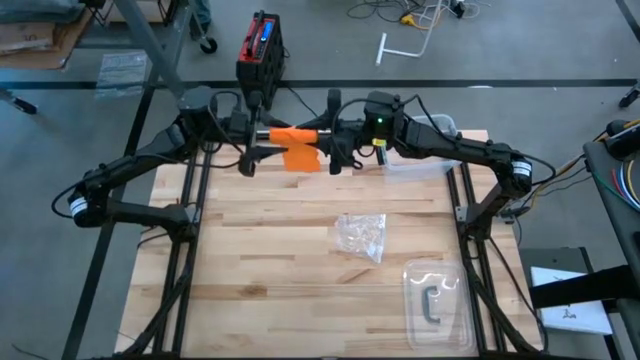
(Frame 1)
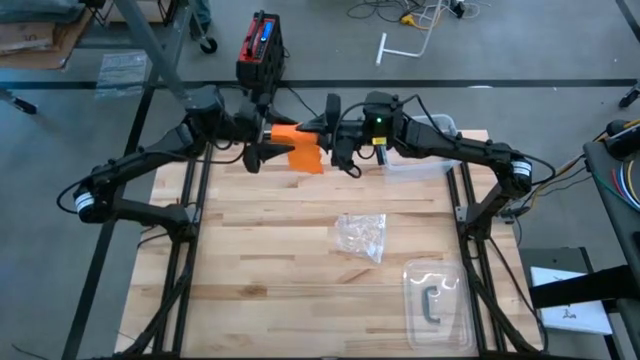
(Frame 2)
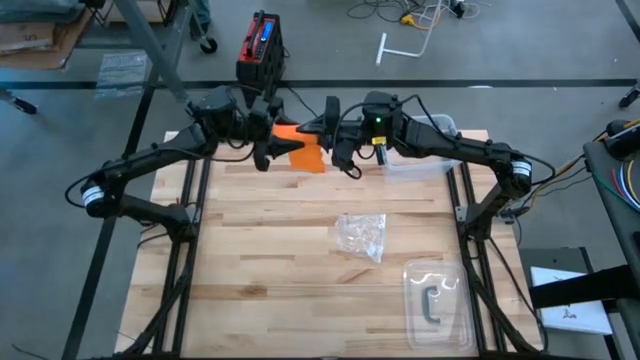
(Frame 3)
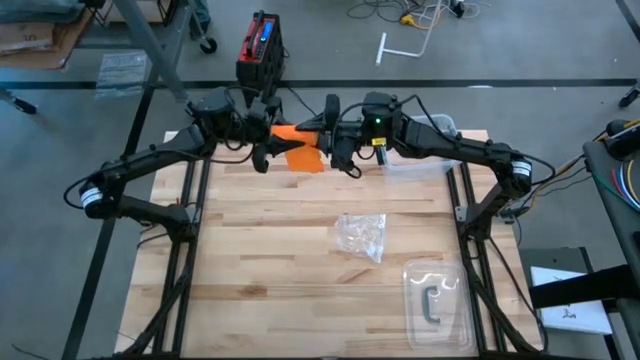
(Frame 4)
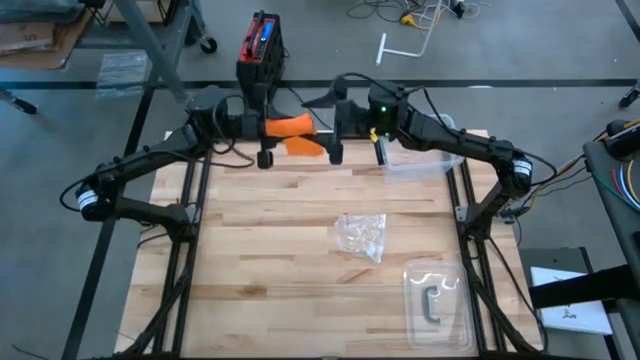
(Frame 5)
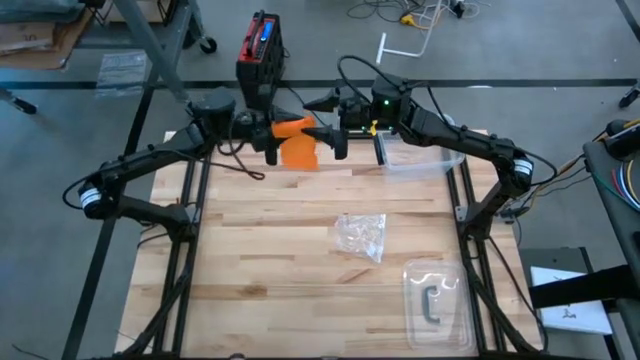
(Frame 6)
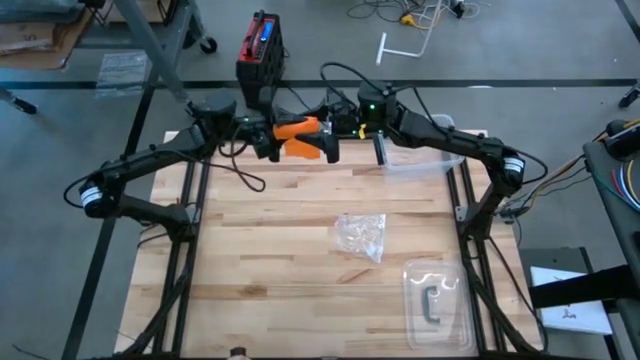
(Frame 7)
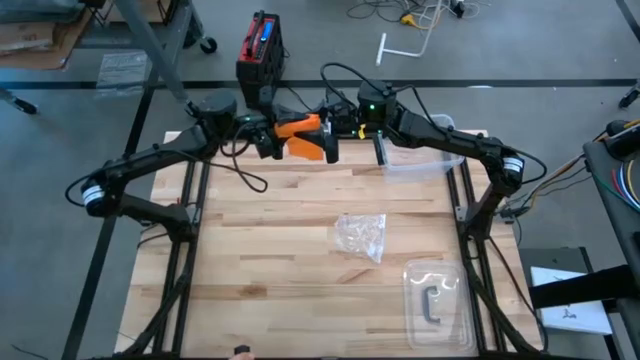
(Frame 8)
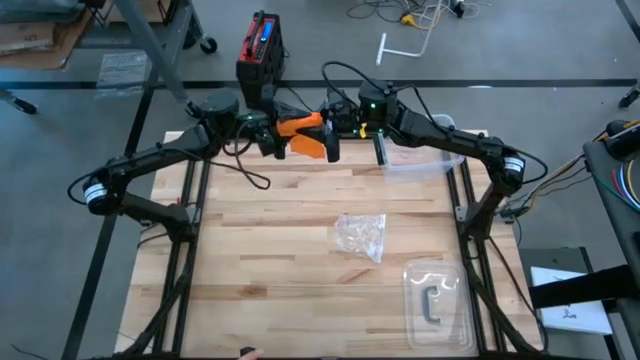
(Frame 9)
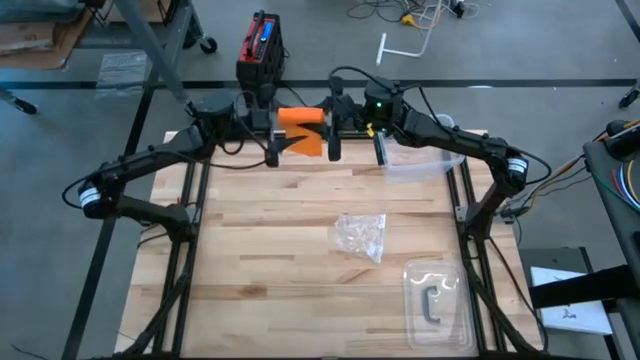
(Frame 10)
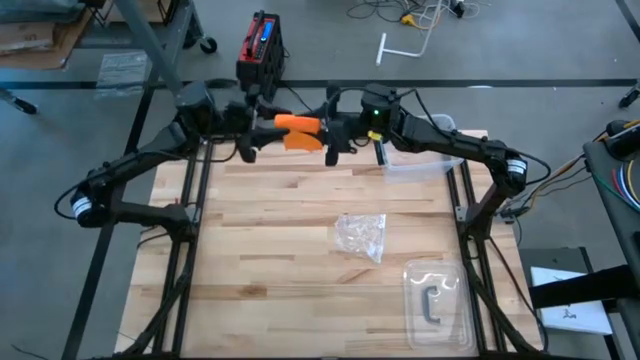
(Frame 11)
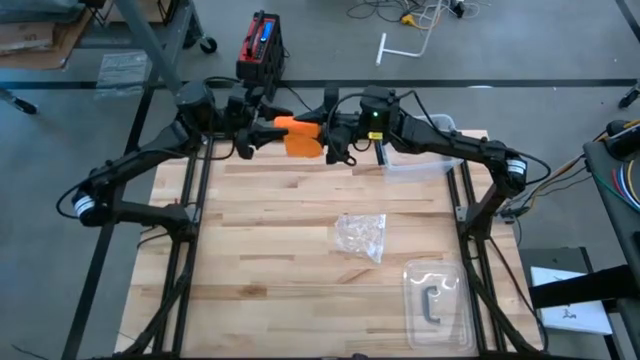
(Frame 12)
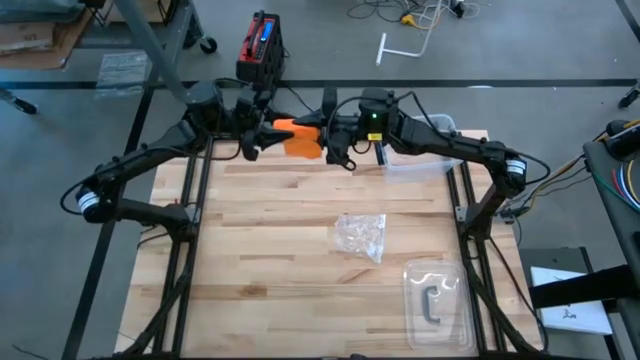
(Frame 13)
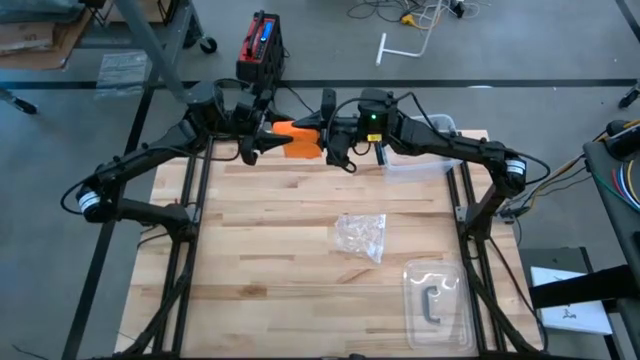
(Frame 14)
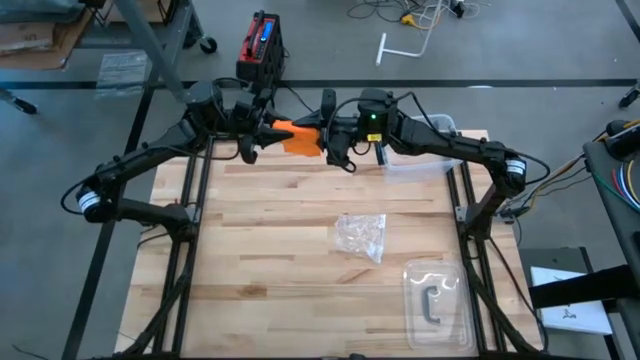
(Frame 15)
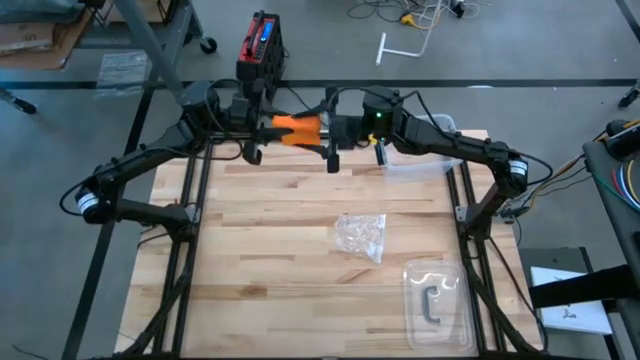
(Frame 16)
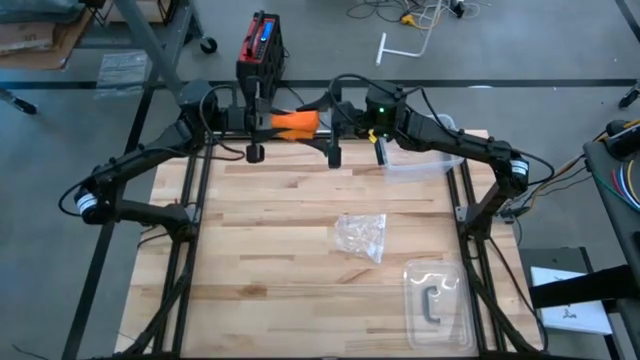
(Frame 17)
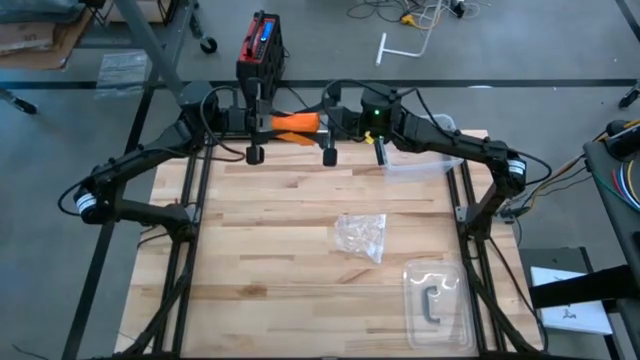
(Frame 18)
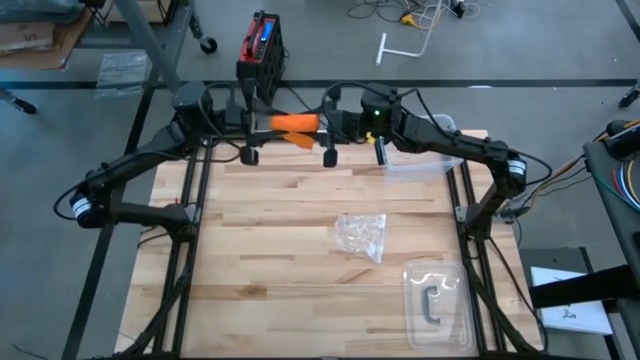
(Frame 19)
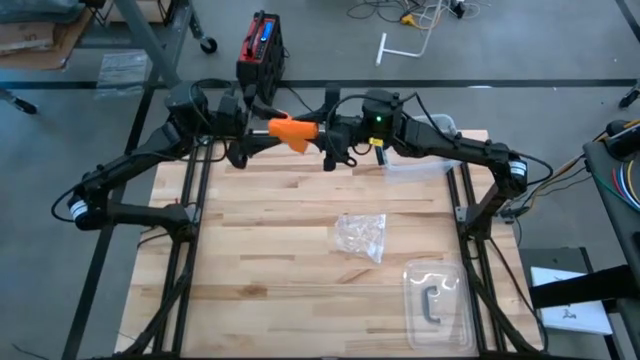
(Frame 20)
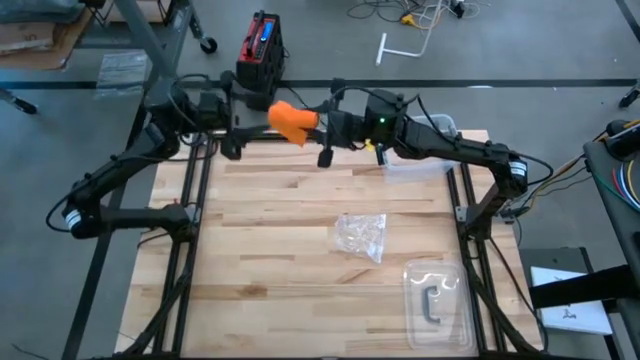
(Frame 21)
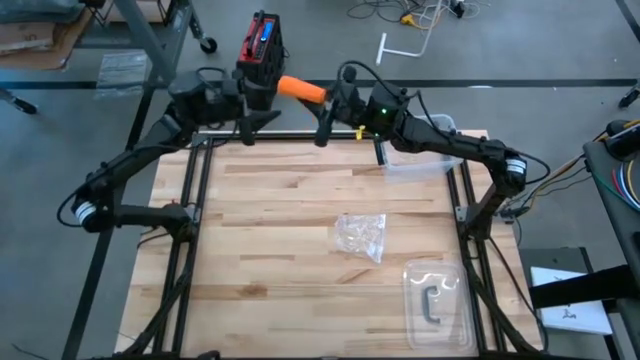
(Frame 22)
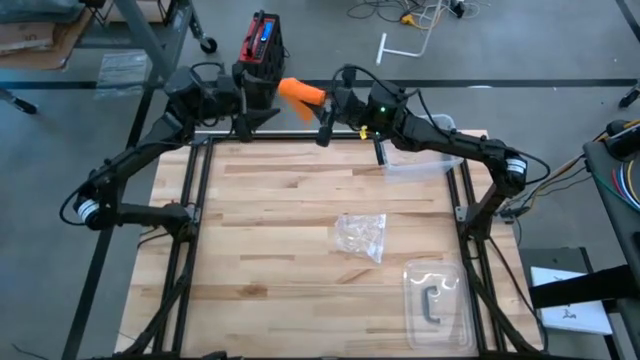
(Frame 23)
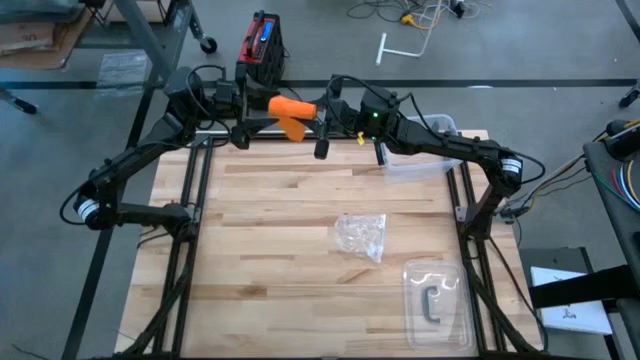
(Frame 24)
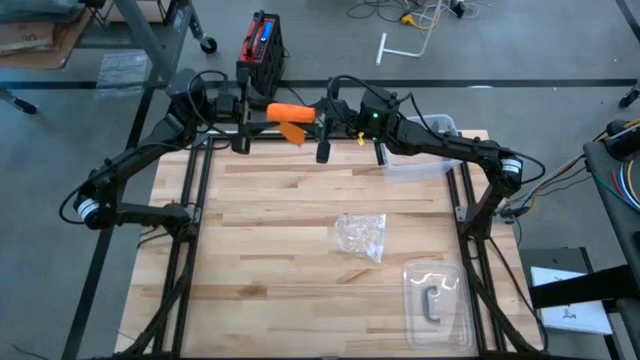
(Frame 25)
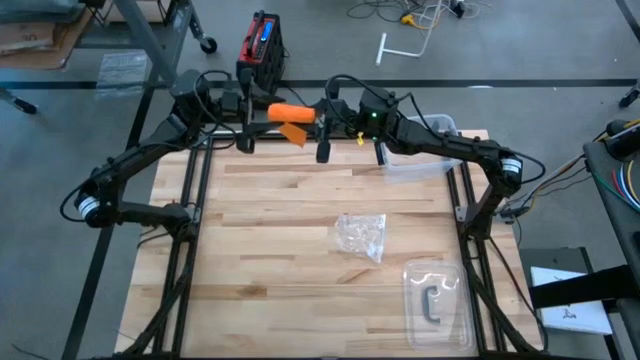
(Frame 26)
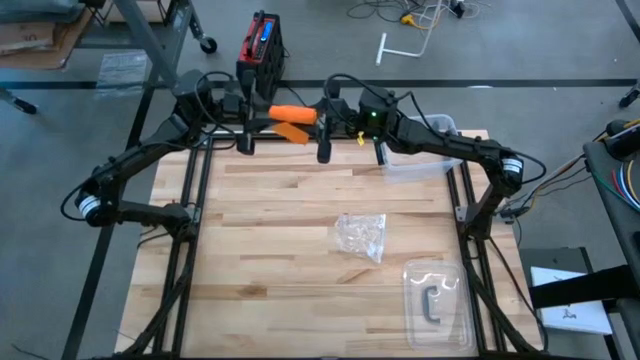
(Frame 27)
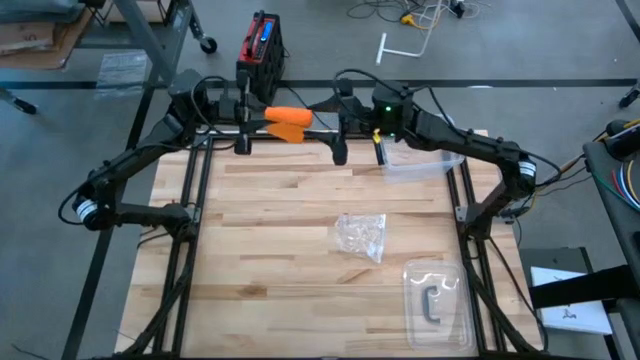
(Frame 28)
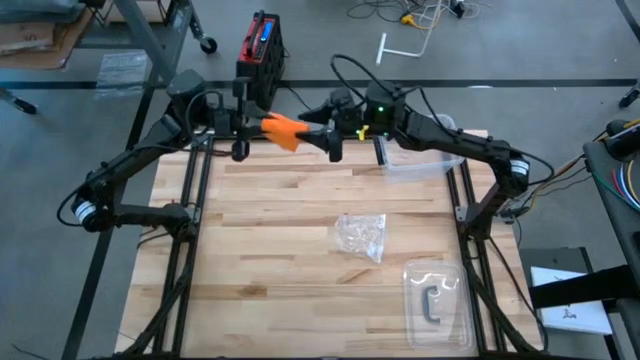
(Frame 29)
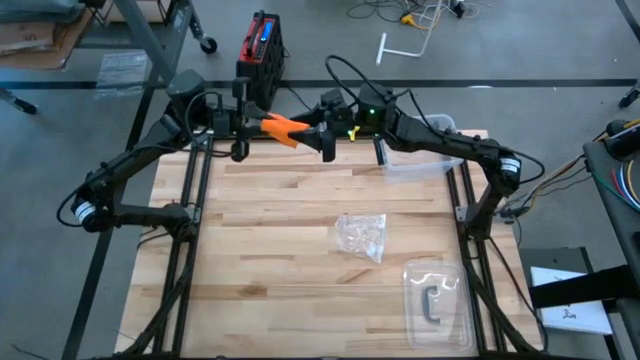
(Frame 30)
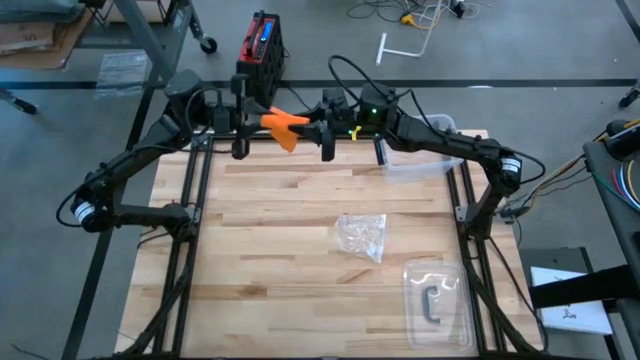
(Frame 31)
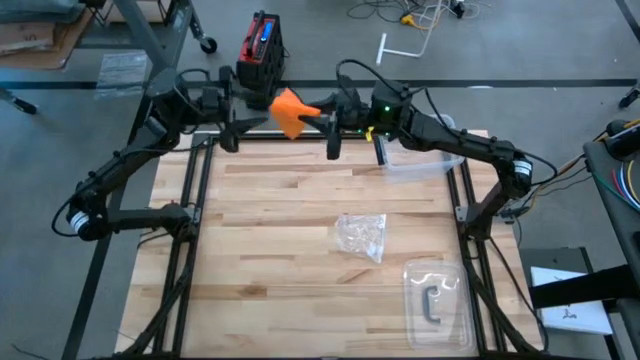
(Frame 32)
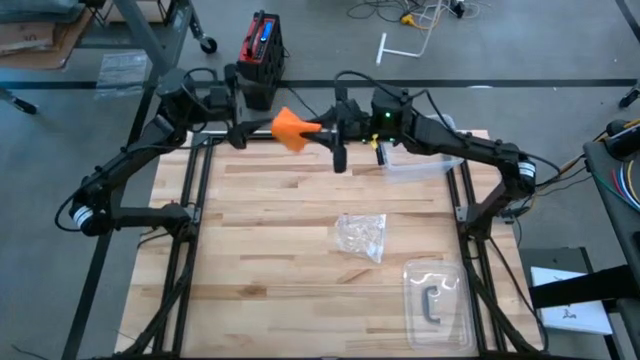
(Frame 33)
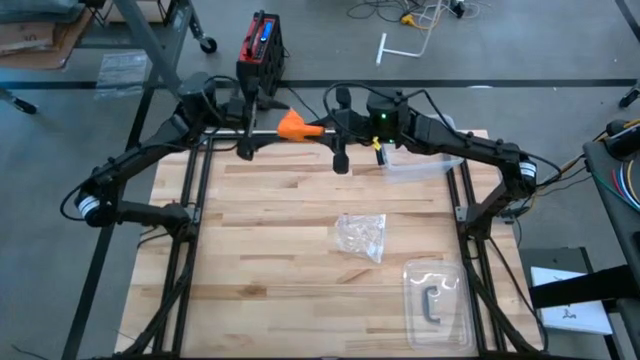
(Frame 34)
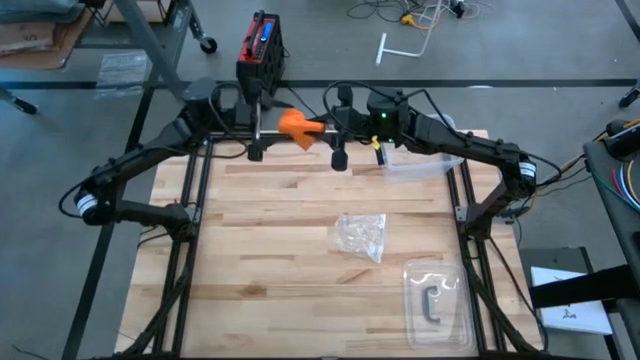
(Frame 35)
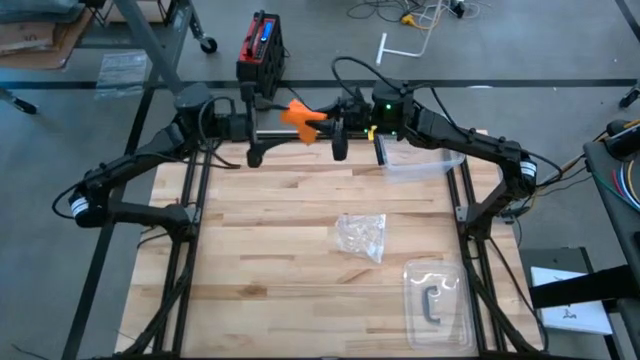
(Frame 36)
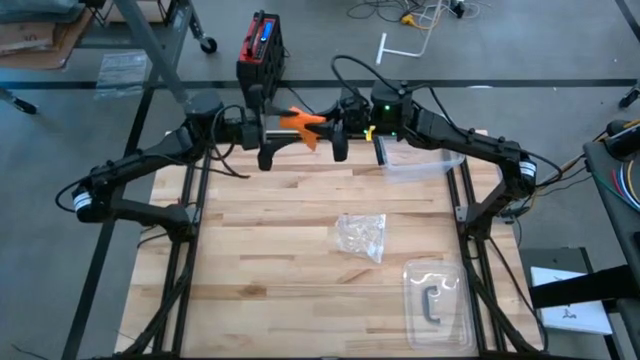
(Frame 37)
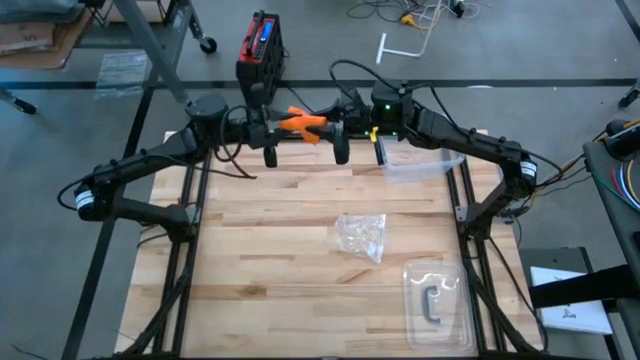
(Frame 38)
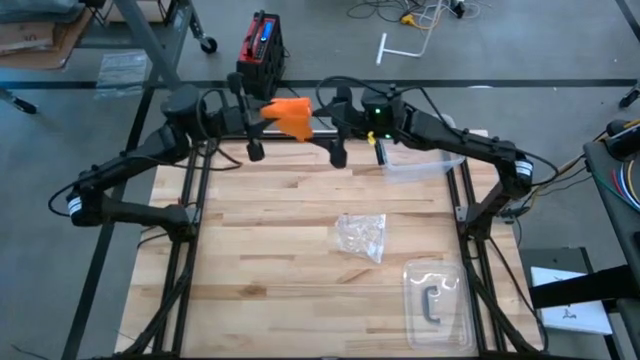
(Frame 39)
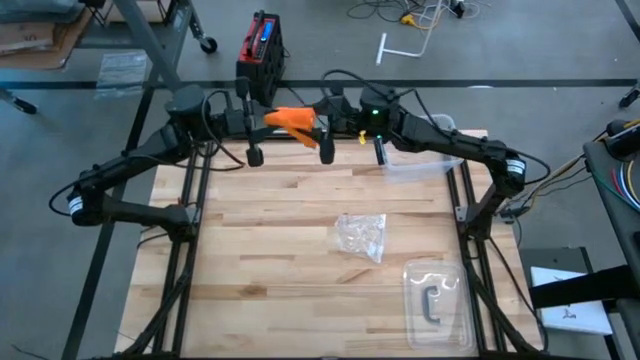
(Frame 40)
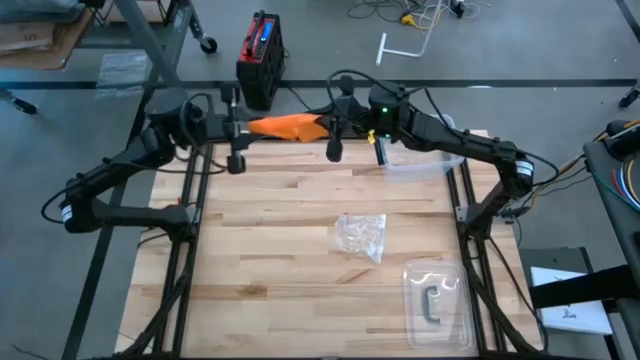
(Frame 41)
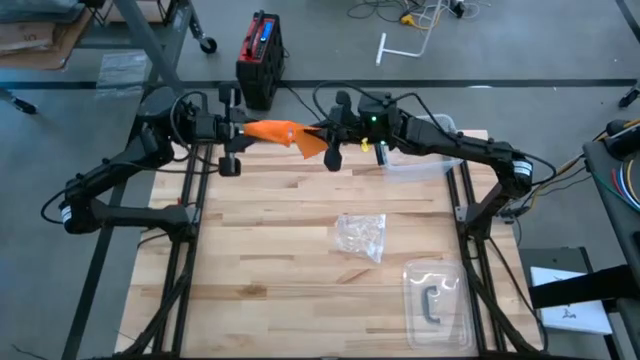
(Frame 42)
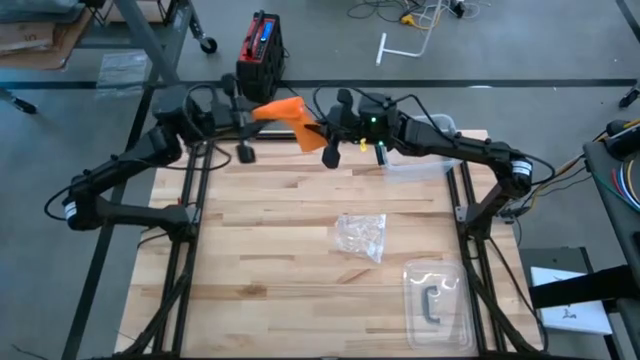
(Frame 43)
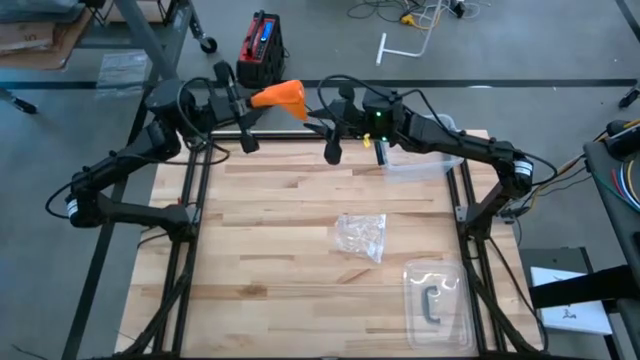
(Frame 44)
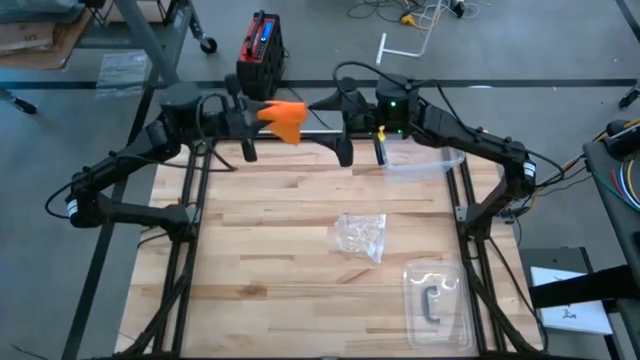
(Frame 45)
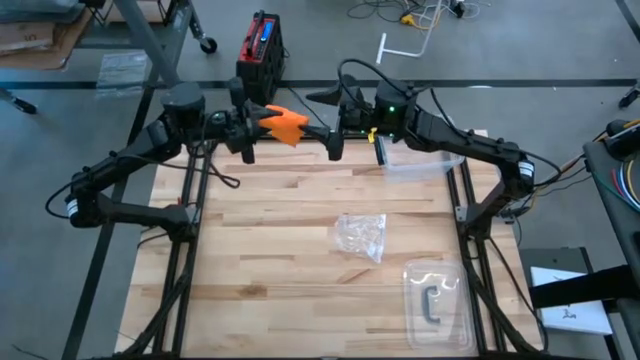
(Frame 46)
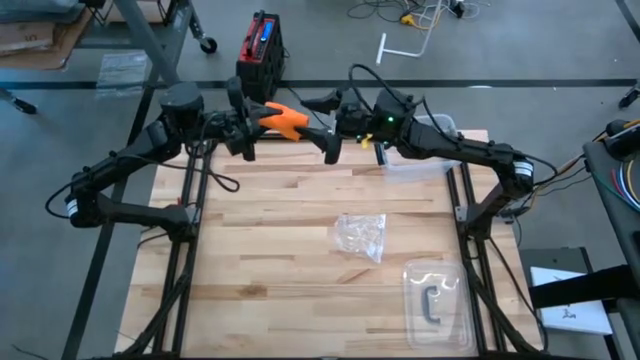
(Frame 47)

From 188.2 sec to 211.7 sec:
Task: Roll bandage
Roll the orange bandage
